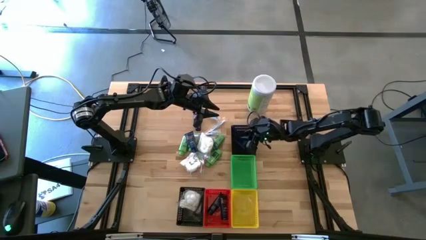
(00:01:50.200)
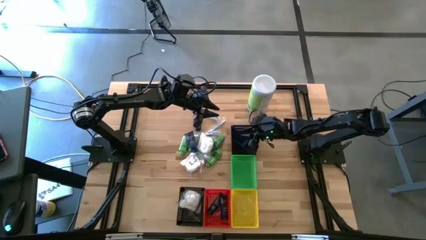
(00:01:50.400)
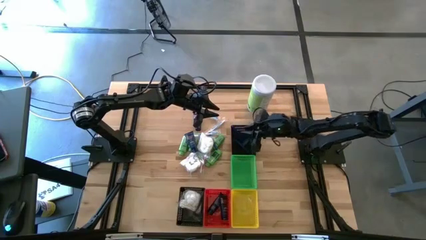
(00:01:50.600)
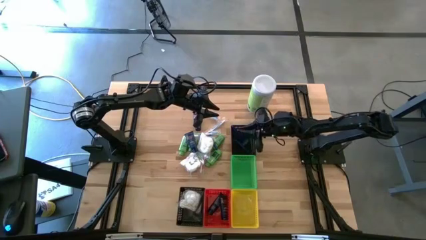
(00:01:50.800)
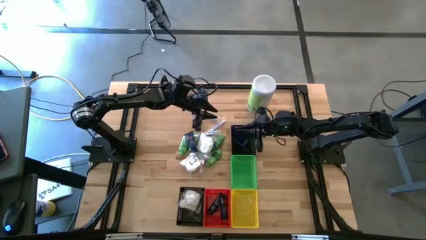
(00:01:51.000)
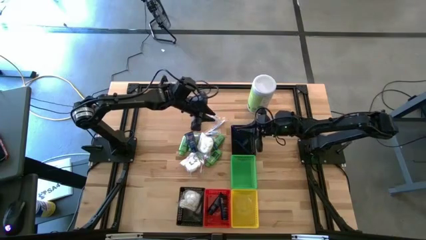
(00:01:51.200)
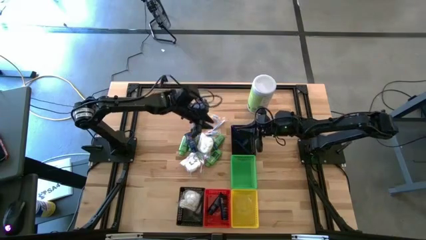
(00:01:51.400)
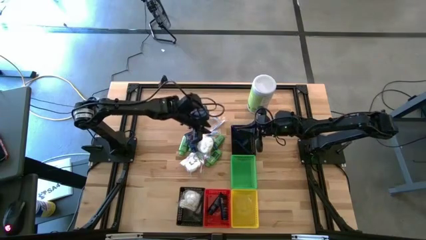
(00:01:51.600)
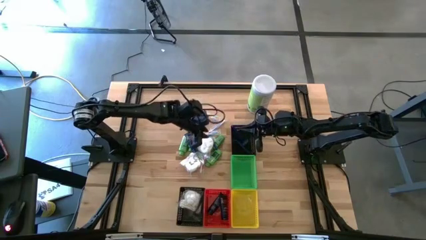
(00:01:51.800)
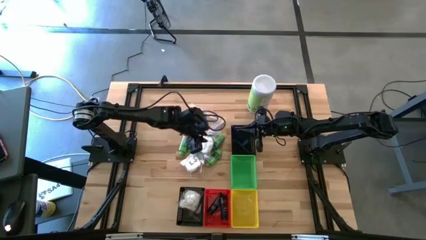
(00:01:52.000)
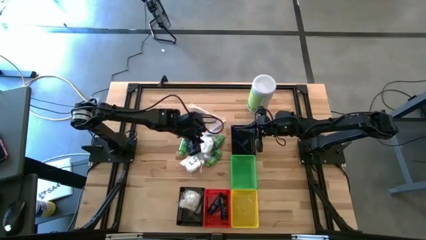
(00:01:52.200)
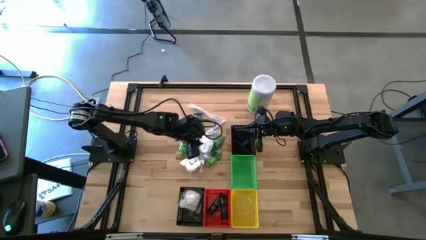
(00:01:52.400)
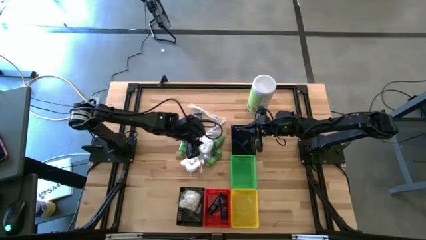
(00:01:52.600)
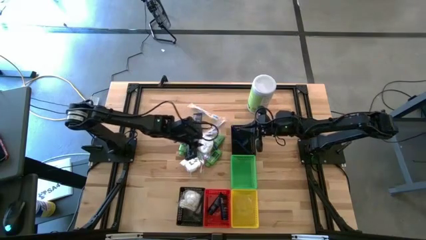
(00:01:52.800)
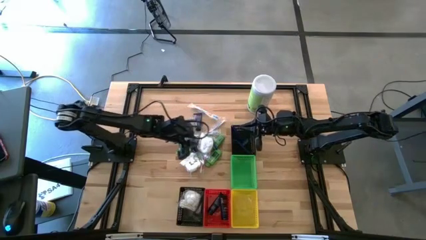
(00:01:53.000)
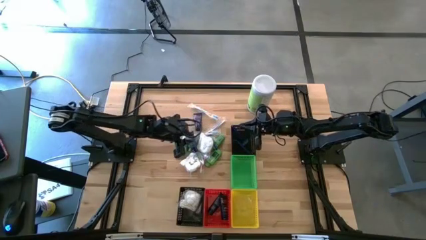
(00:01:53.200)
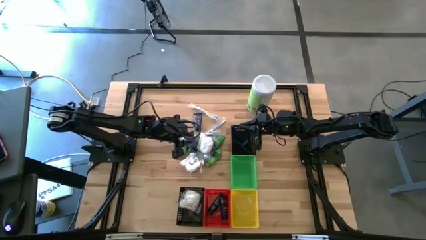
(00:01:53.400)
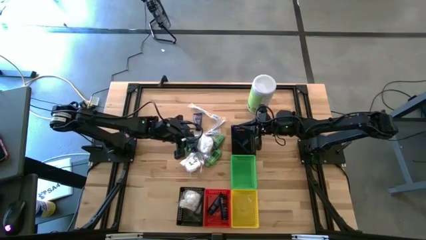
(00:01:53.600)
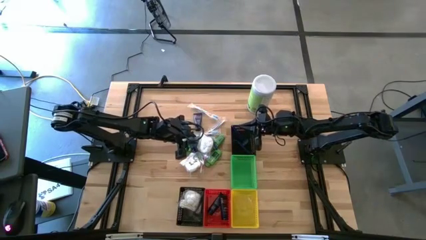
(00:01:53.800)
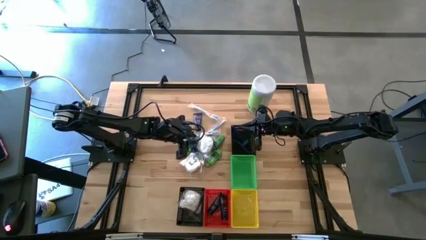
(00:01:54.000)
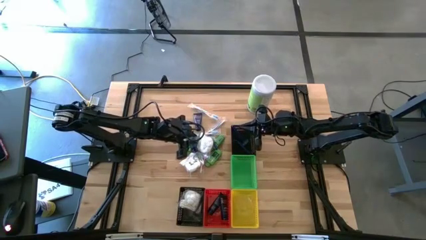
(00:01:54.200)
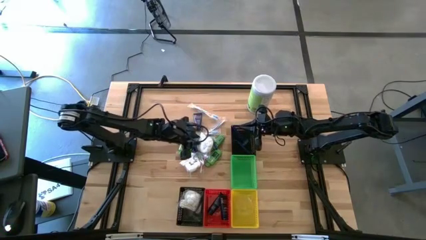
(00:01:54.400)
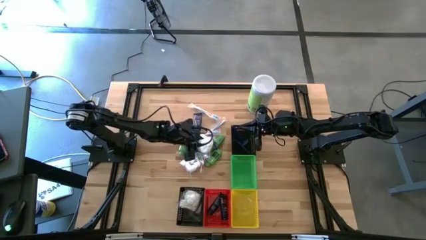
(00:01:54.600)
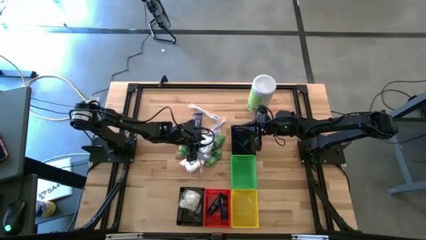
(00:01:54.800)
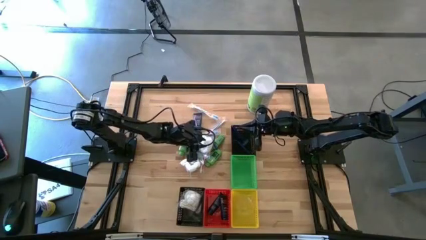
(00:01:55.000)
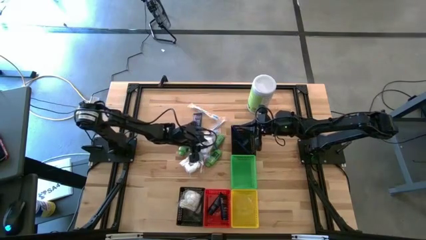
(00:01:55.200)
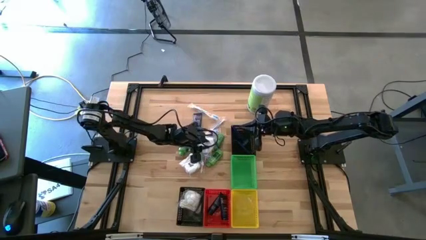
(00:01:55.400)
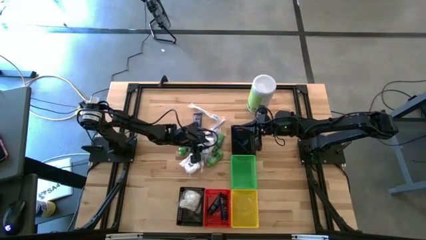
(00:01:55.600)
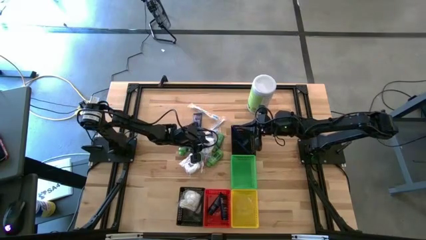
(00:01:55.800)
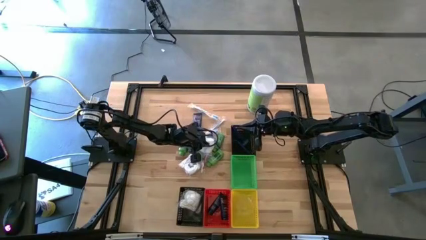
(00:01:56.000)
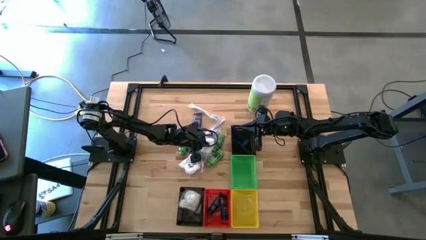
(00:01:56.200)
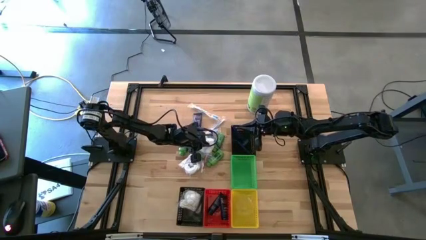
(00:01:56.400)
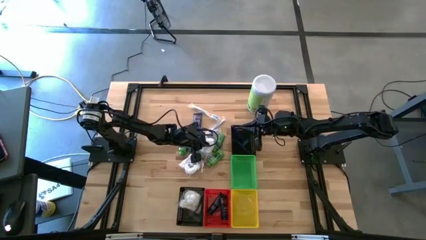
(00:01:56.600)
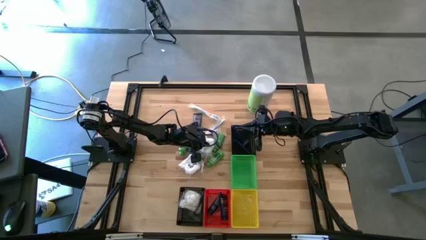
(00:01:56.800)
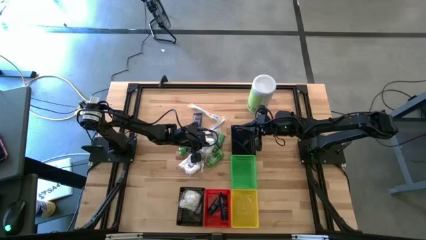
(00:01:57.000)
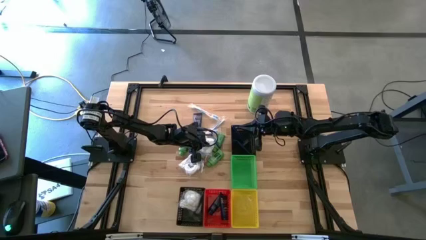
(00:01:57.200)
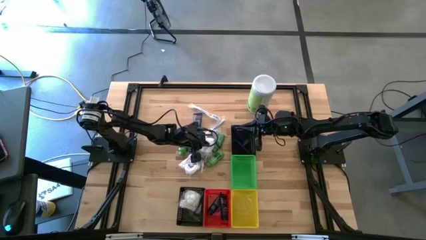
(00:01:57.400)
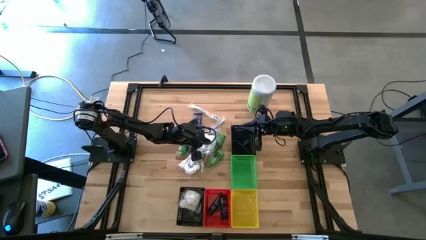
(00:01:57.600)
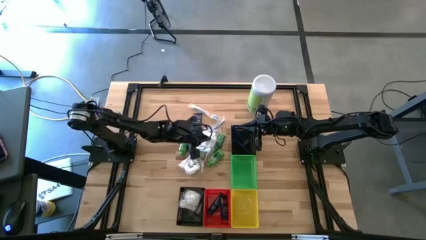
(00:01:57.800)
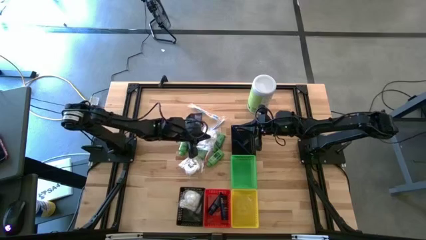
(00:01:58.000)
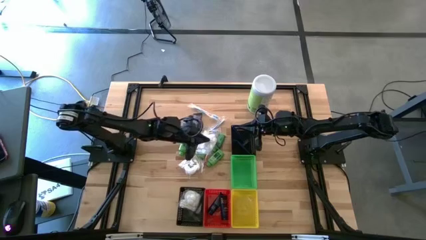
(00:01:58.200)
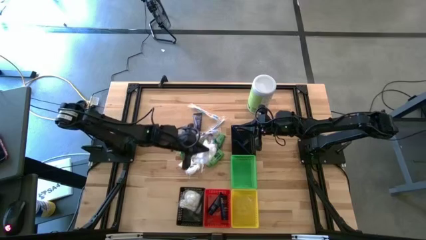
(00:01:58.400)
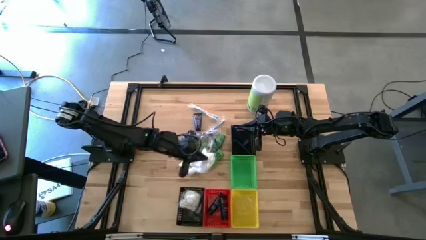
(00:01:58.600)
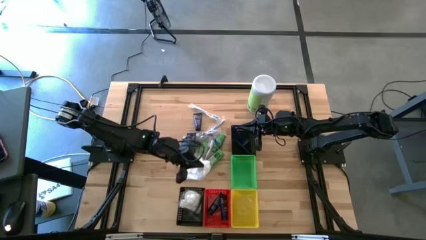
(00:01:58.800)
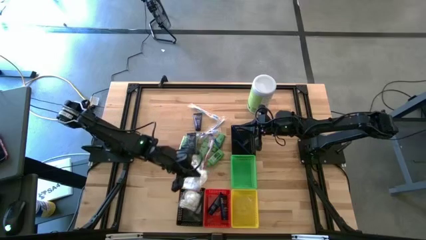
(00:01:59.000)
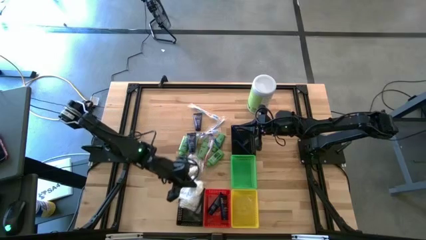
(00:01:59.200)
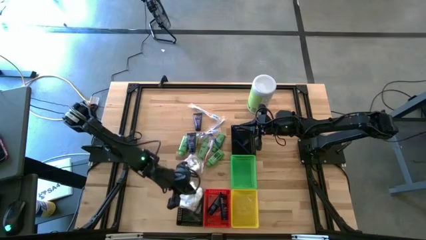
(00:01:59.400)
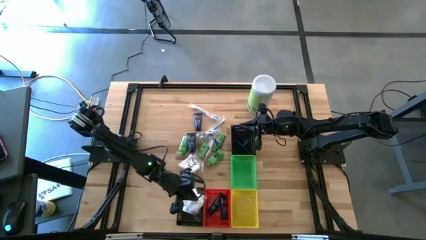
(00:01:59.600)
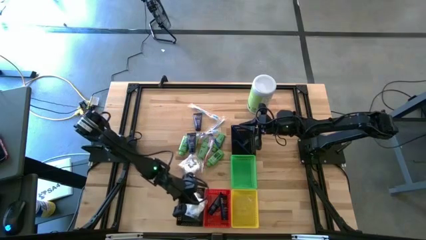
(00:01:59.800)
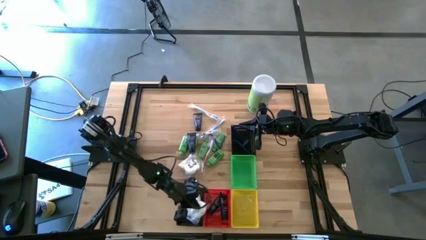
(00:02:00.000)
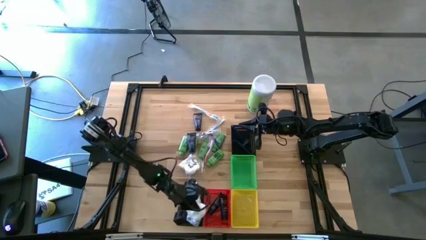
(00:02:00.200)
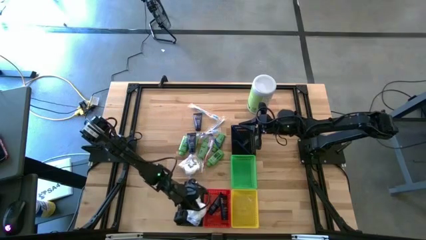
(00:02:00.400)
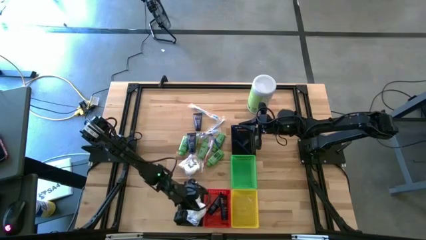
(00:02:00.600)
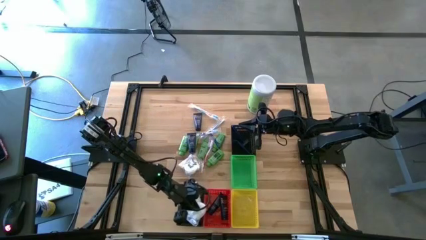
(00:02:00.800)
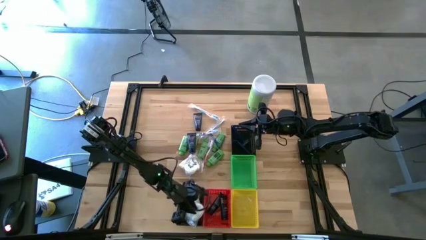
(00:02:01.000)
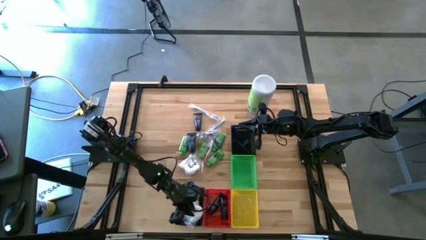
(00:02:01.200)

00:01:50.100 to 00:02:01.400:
Task: Pick & Place Travel size toiletries
Put the white cotton pack into the bottom black bin

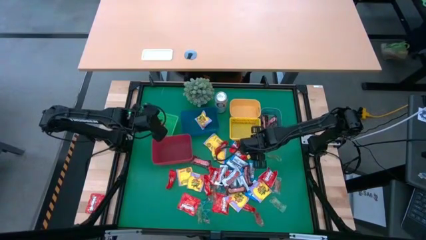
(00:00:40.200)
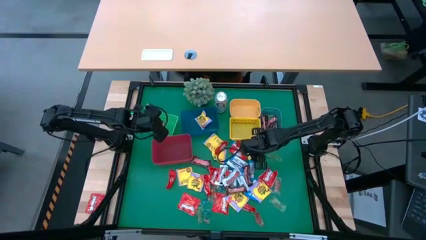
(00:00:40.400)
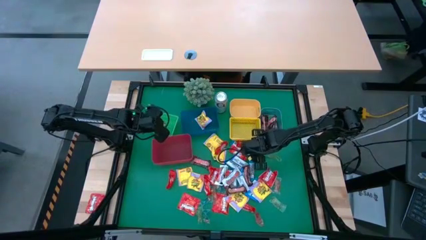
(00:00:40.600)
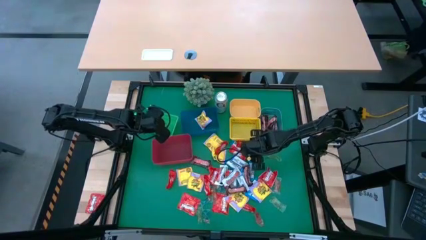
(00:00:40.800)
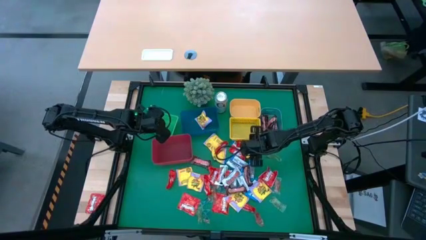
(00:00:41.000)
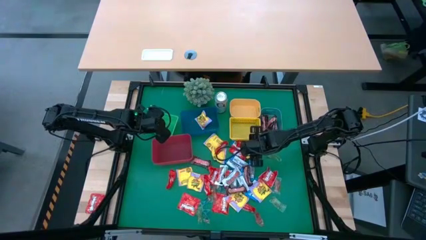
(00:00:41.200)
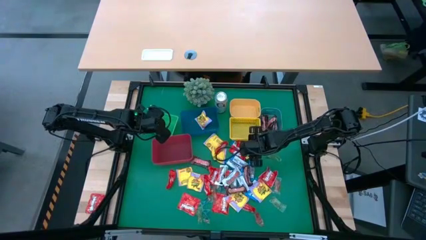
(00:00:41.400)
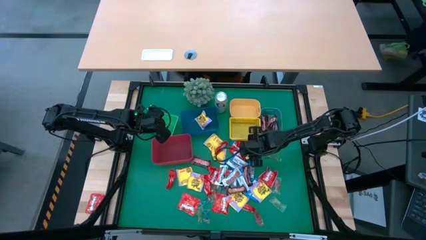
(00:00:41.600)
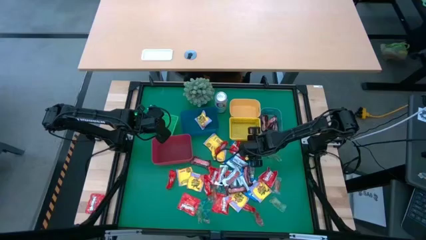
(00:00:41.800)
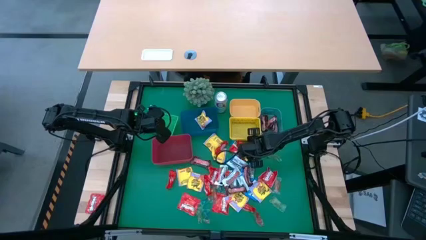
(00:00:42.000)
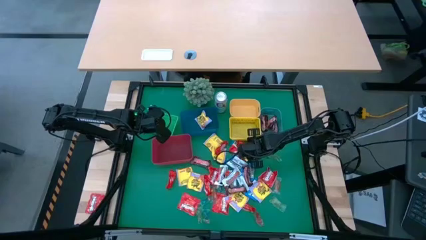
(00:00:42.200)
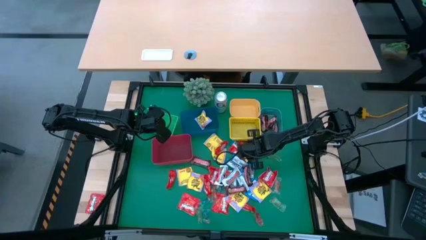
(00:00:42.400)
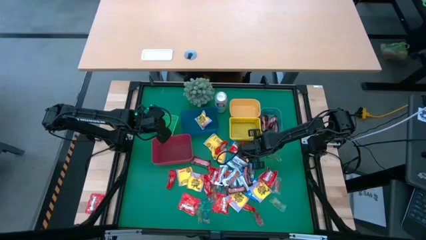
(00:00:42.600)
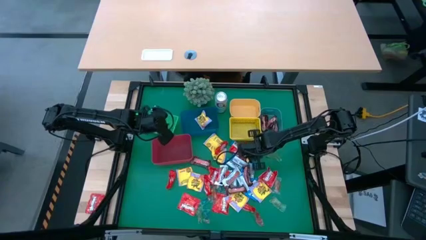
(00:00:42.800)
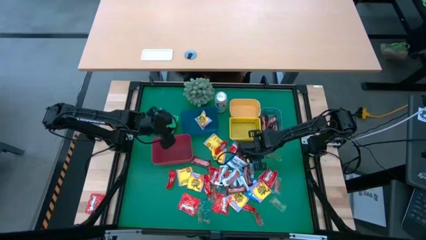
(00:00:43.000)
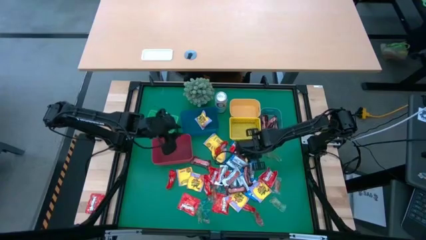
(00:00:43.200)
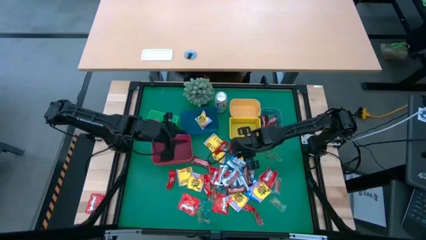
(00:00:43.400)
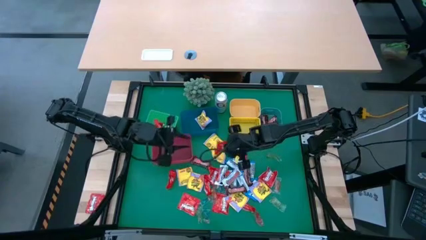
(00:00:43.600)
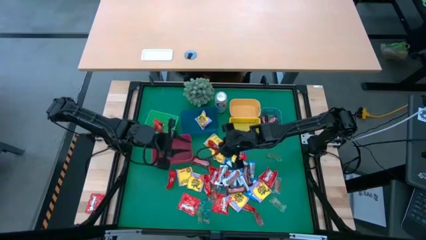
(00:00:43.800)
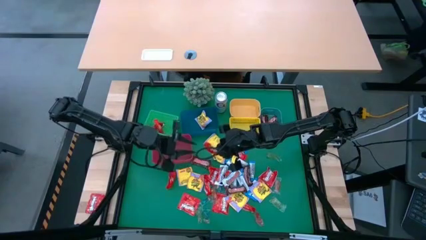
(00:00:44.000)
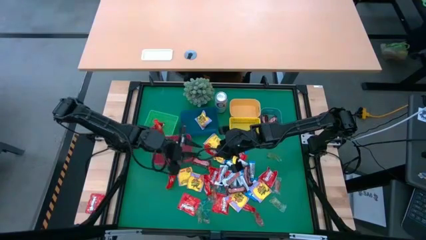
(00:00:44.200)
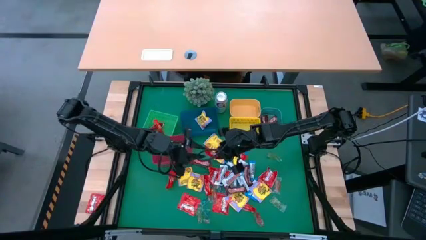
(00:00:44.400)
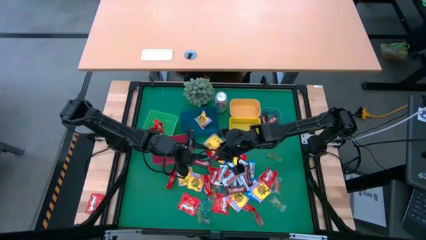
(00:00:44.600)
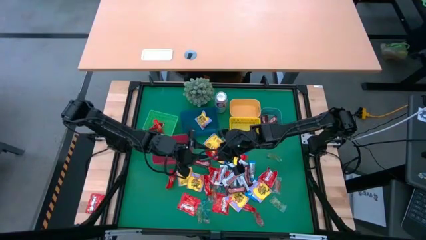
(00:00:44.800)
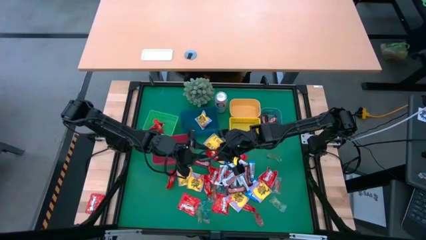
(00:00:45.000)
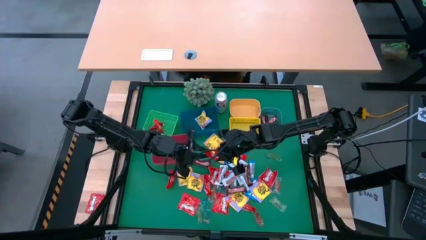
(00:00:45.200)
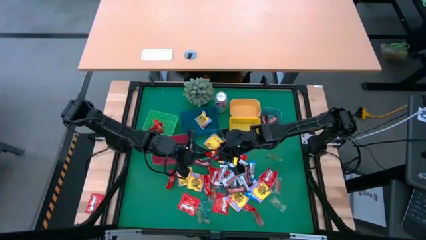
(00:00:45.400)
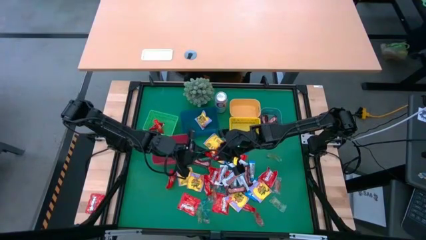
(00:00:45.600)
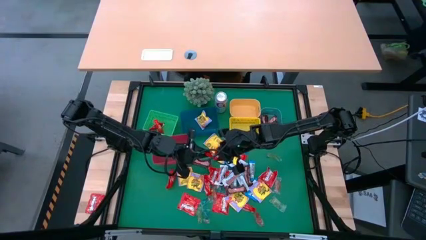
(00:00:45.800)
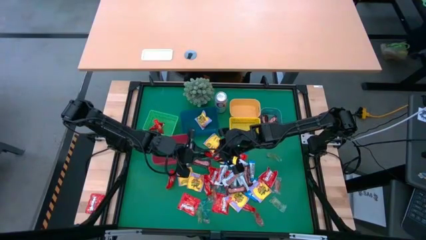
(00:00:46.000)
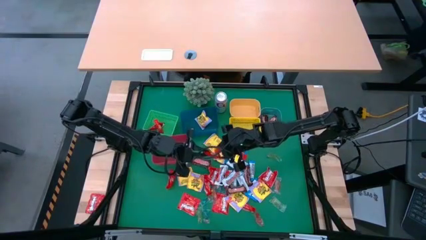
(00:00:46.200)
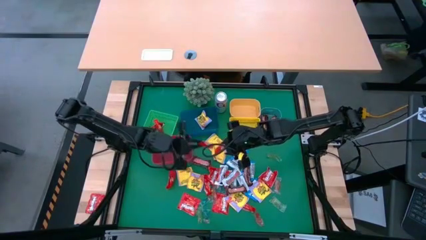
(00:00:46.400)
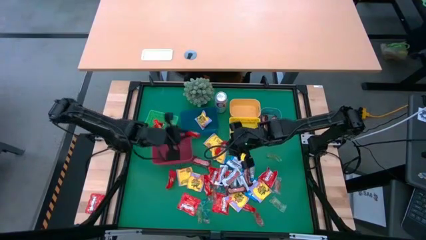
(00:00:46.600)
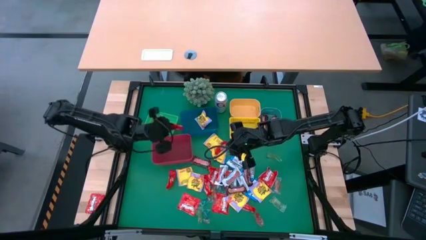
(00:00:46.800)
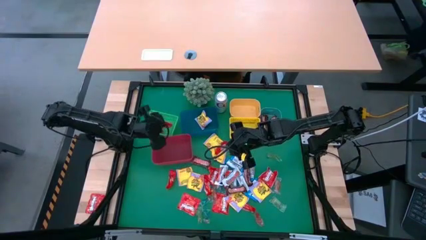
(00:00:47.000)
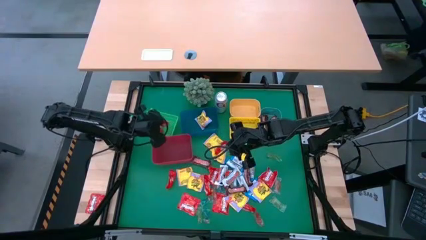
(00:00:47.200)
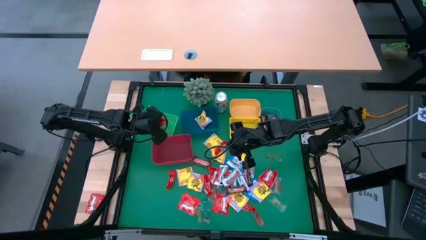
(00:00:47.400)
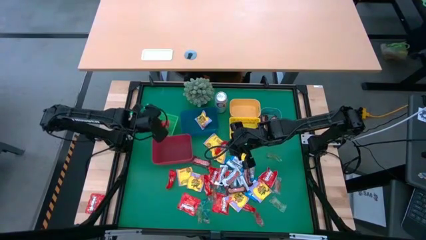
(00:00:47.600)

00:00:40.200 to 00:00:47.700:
Task: Sort candy
Put the red chocolate bar into the green bin
